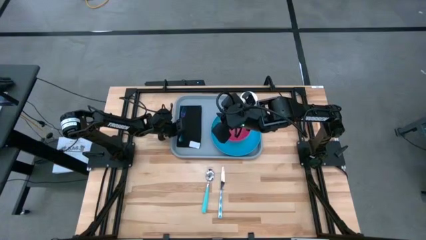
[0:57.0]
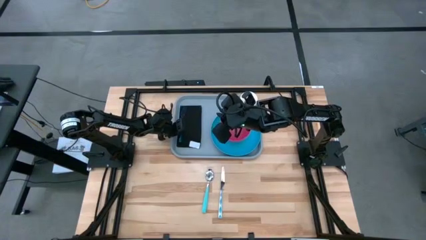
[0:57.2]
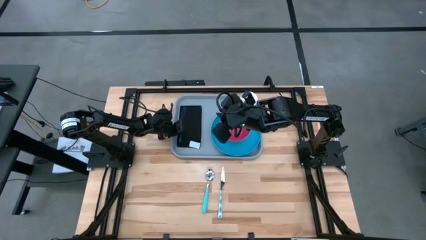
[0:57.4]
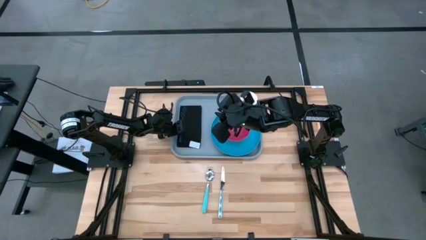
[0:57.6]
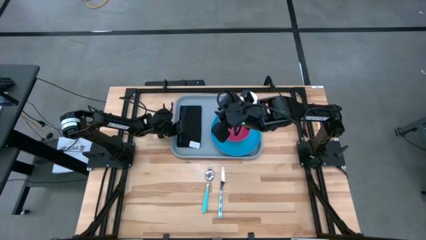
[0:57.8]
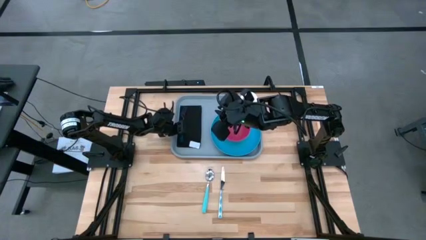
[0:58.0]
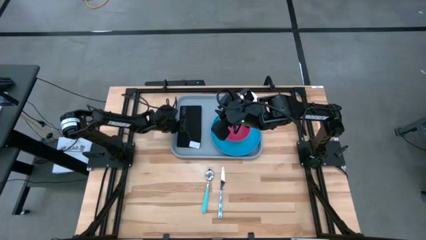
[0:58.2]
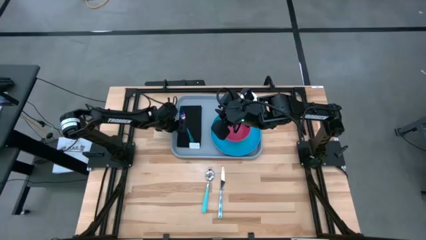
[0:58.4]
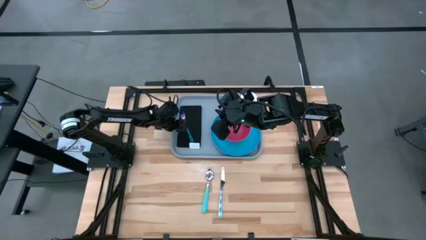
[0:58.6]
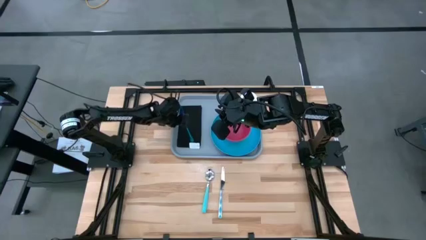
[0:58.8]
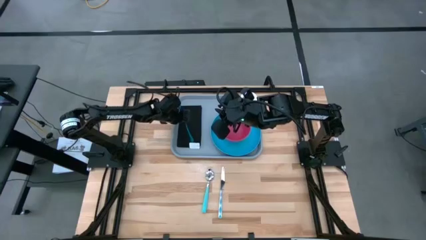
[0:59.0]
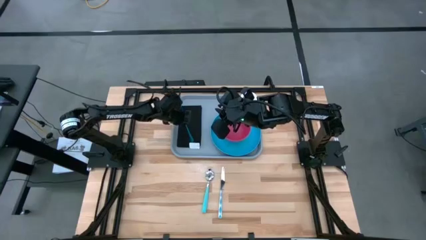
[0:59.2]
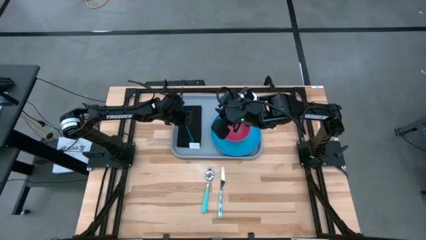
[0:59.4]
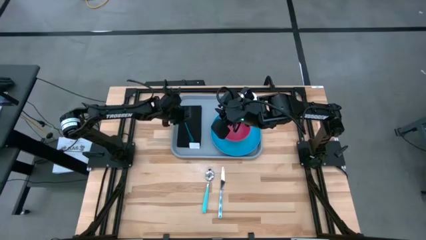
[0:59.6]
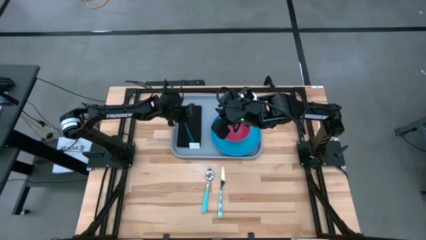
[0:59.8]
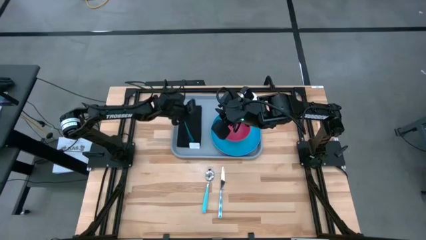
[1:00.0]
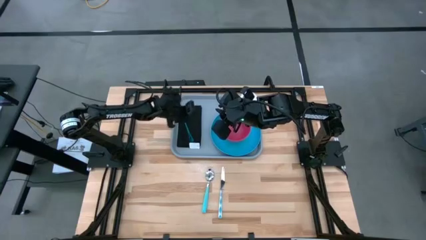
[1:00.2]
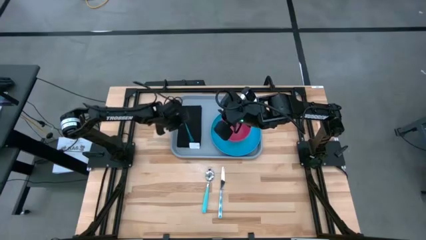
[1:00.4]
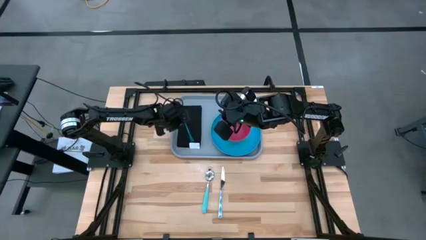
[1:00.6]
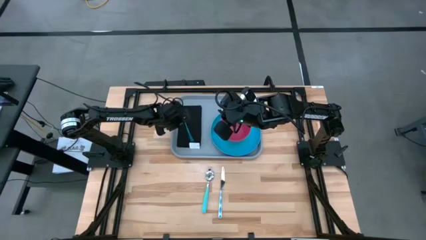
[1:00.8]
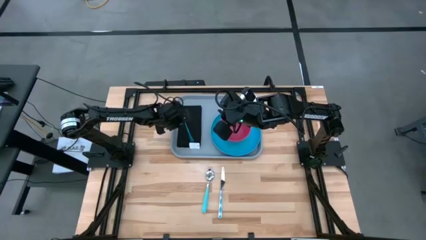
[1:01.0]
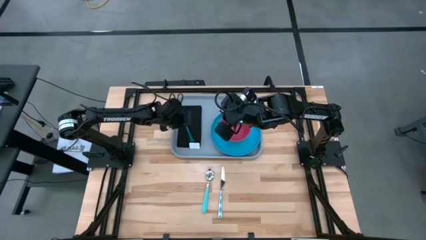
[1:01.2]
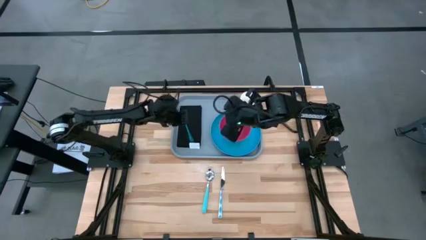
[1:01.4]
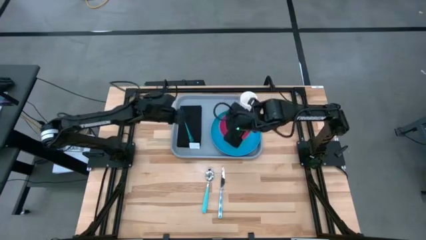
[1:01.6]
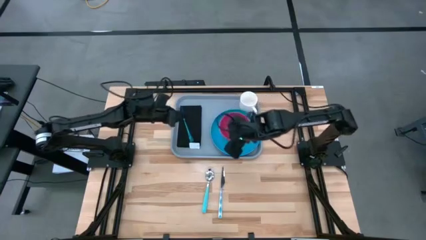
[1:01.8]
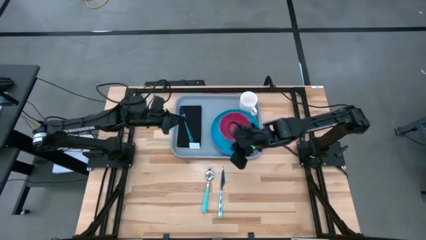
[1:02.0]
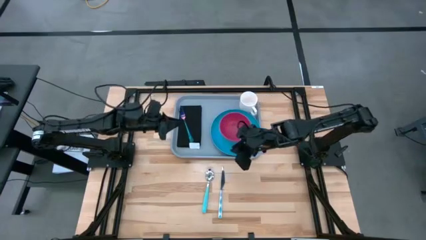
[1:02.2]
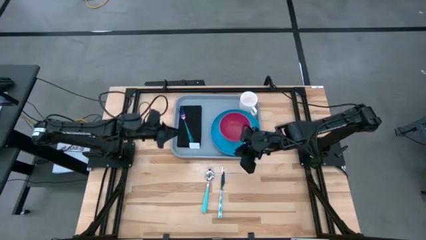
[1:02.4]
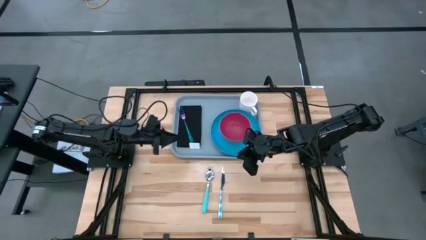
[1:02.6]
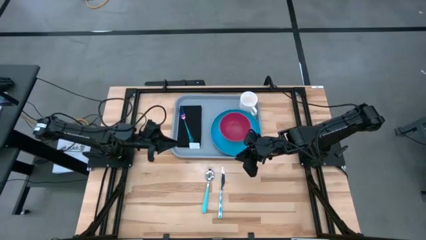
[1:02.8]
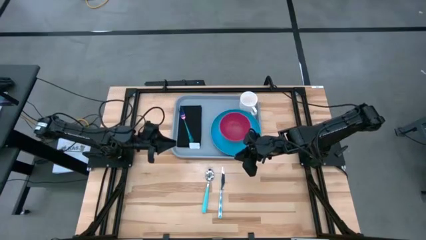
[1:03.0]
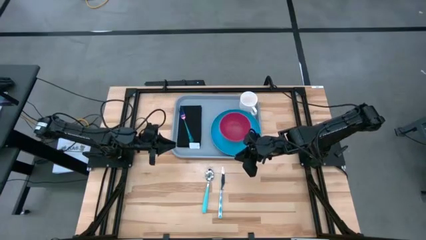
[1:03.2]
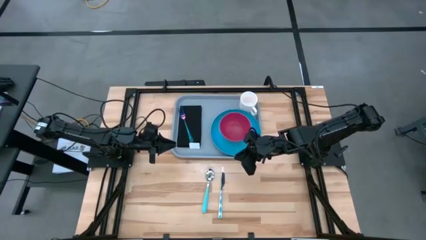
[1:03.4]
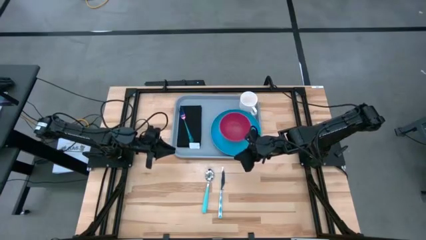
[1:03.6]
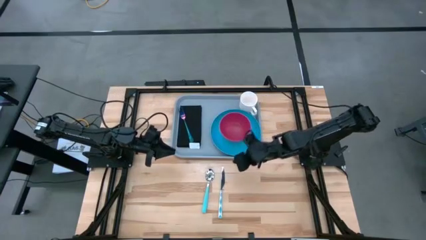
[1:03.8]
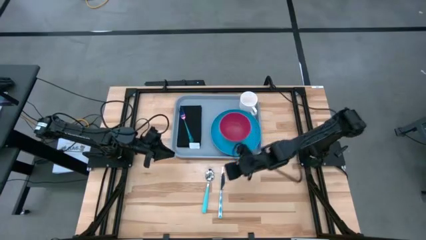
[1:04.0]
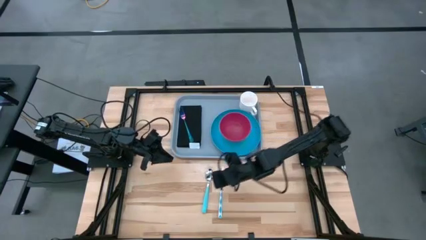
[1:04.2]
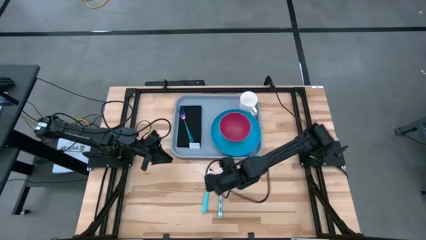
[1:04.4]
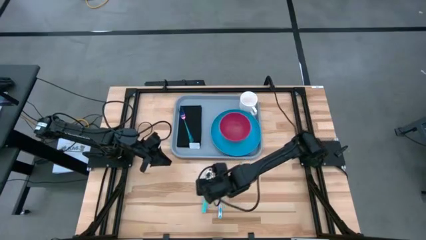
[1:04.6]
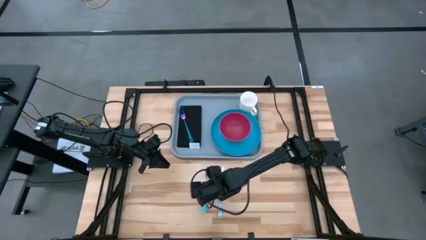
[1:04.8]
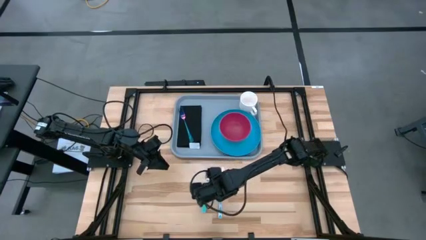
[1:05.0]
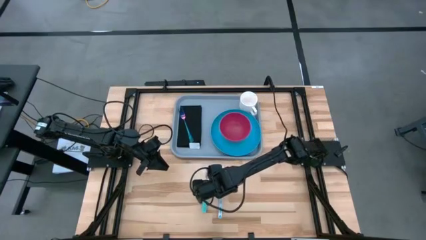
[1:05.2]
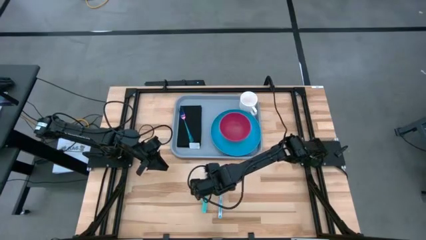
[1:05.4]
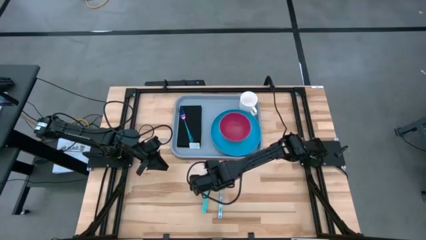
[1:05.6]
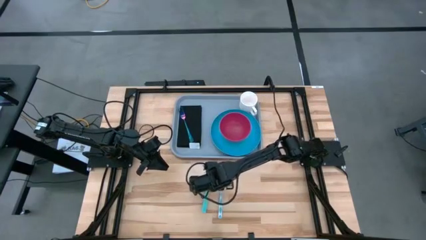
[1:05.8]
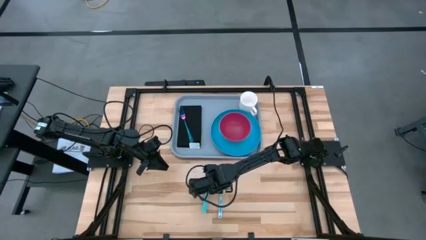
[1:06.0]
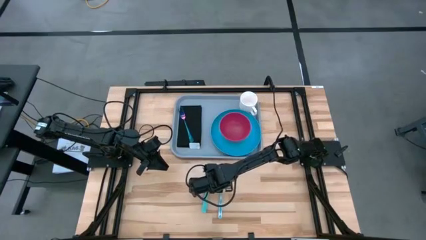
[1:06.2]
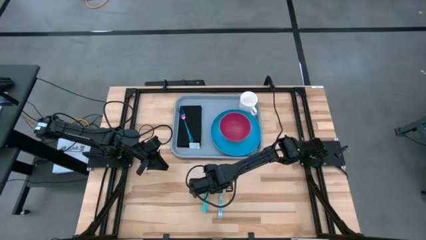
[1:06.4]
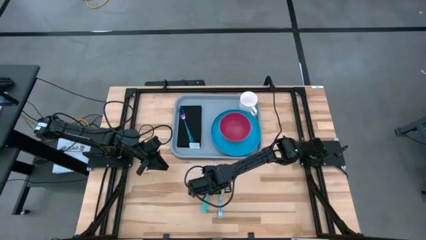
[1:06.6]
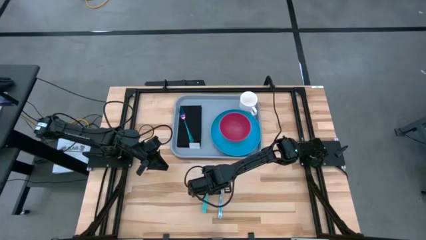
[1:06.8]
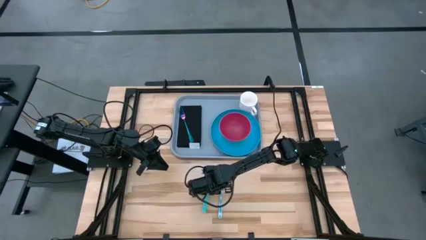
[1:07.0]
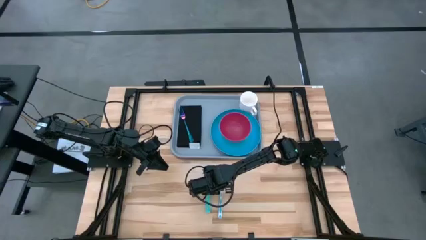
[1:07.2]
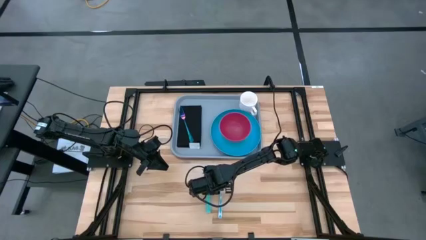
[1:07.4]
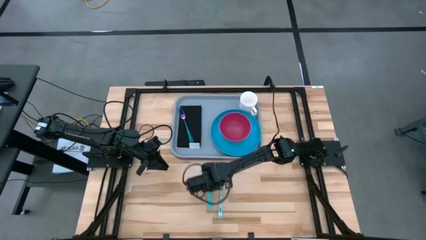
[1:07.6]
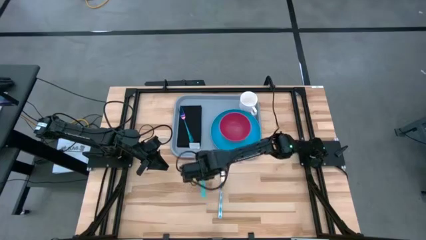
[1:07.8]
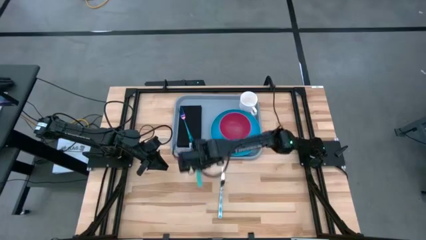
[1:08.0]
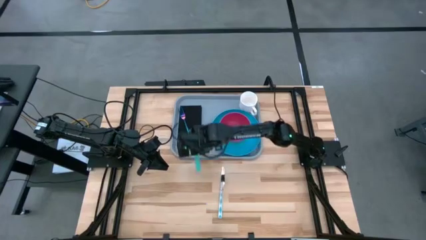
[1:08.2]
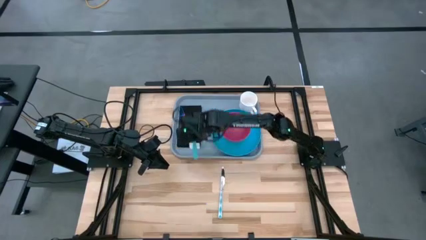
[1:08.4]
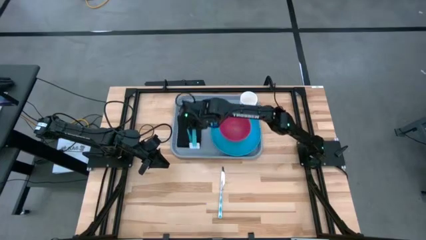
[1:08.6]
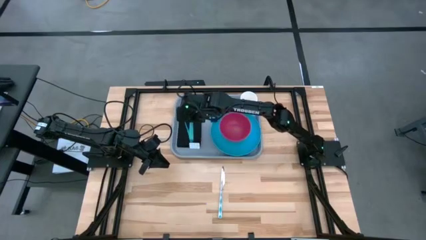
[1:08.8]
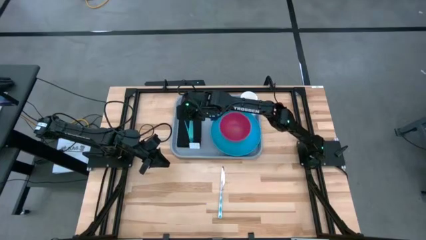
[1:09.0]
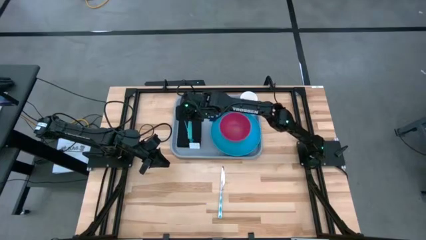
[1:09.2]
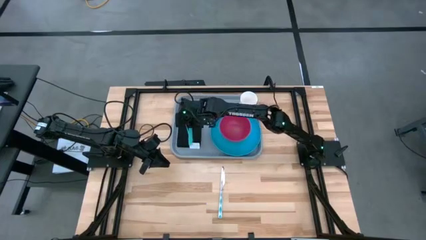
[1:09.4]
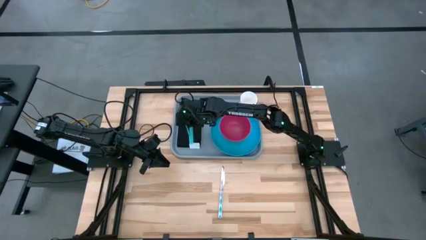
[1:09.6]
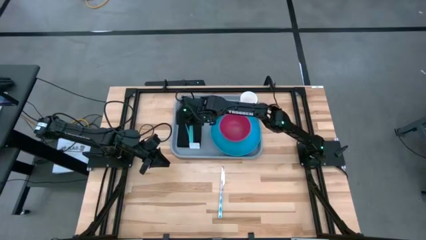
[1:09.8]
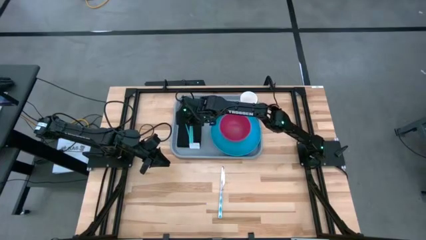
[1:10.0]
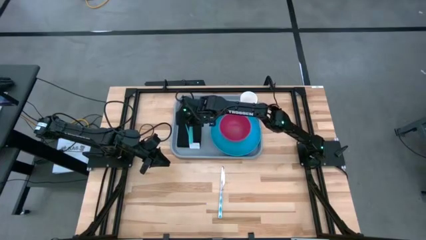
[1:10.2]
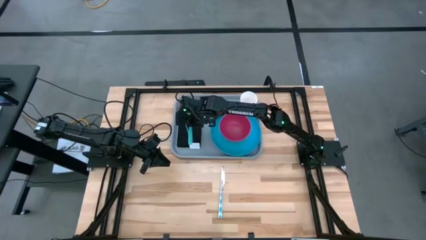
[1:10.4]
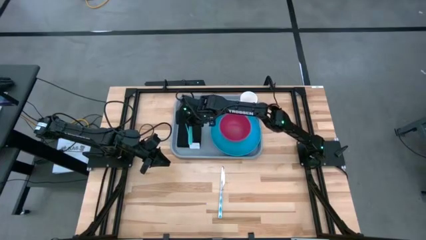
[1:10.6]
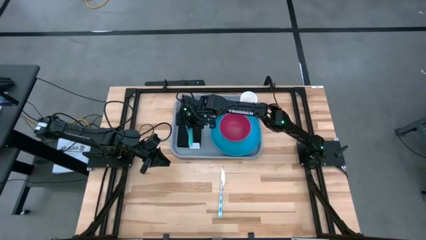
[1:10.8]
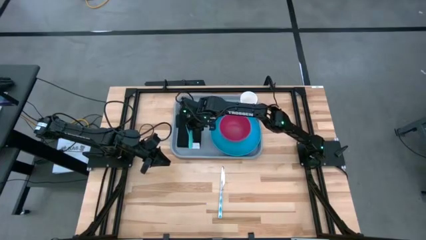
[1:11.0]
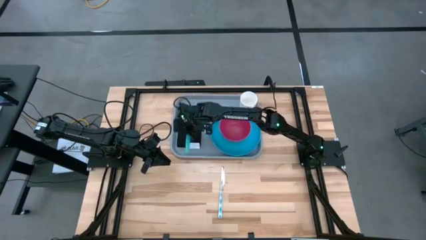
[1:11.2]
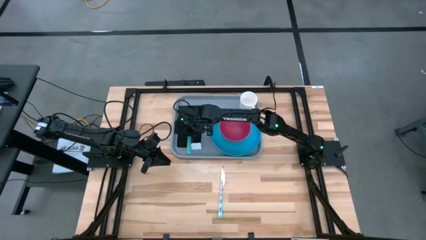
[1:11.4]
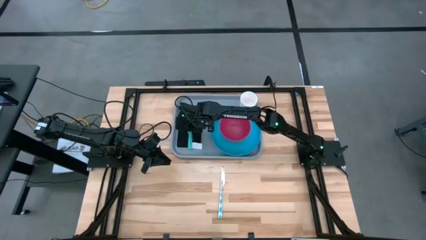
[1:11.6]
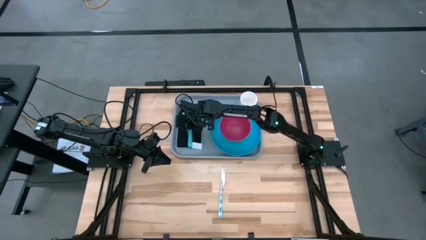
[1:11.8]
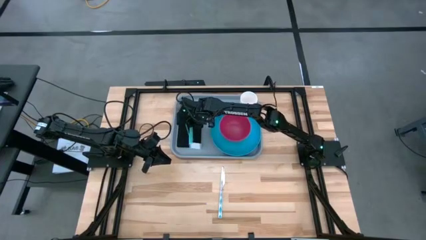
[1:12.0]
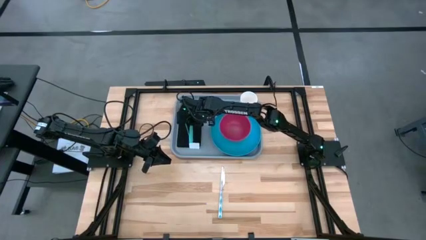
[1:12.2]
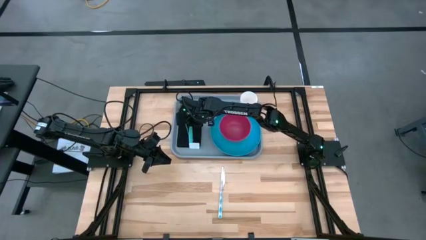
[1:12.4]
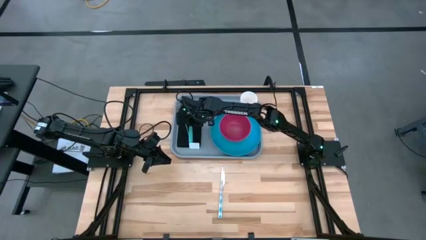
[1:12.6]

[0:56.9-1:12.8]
Task: Set up tray
Put the green spoon on top of the black napkin
